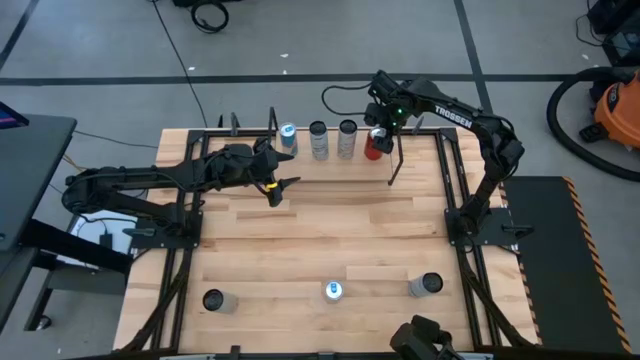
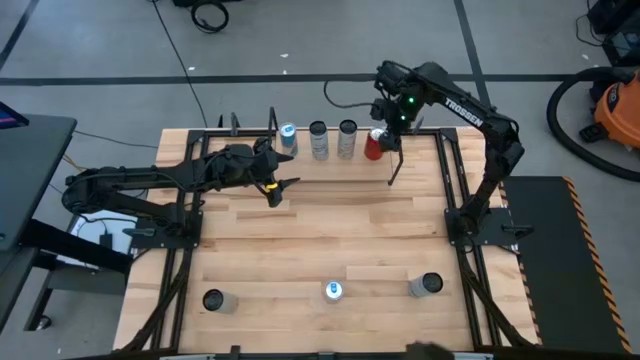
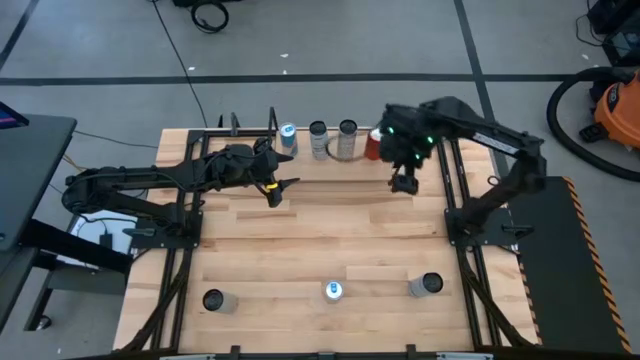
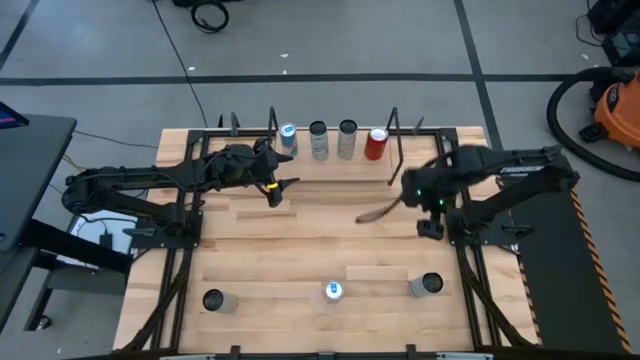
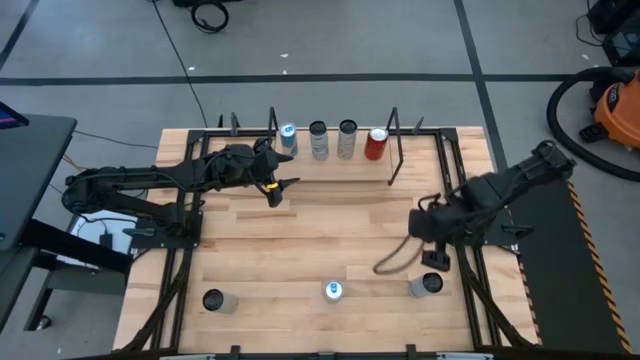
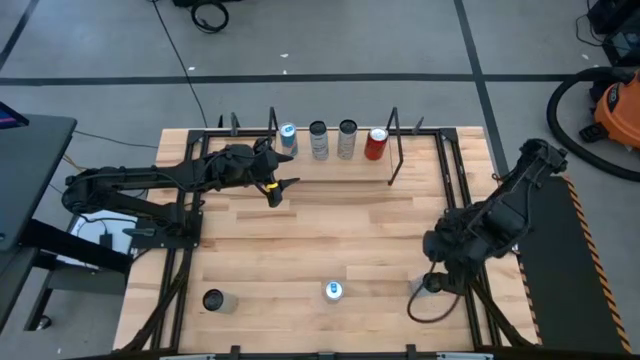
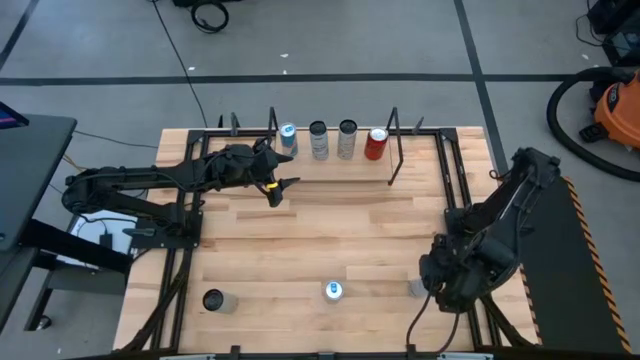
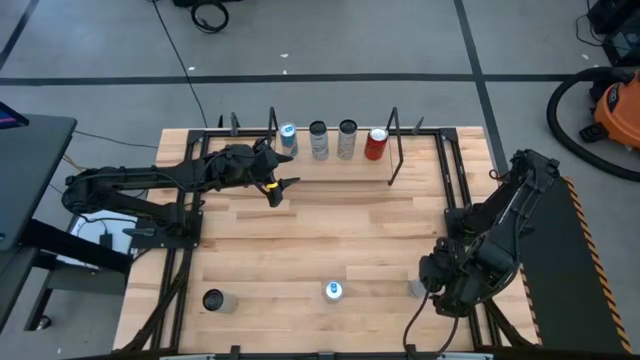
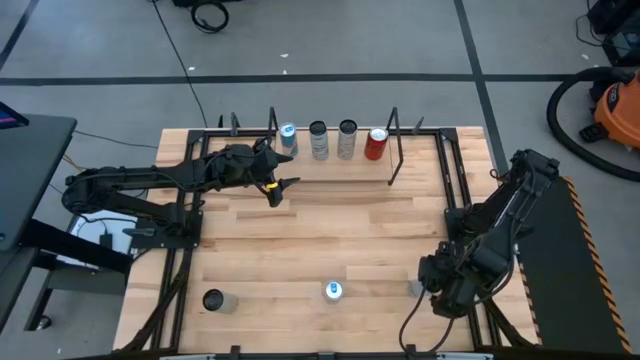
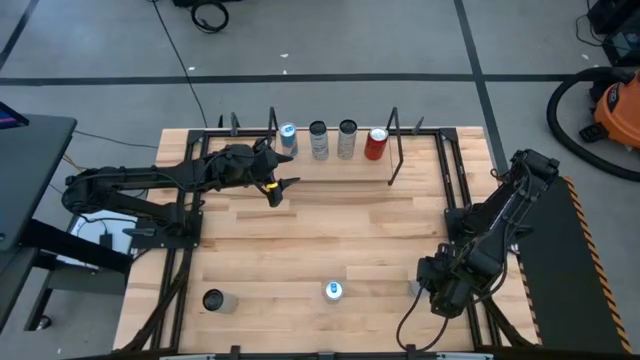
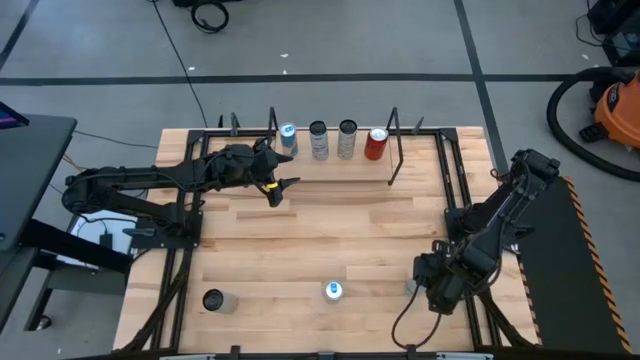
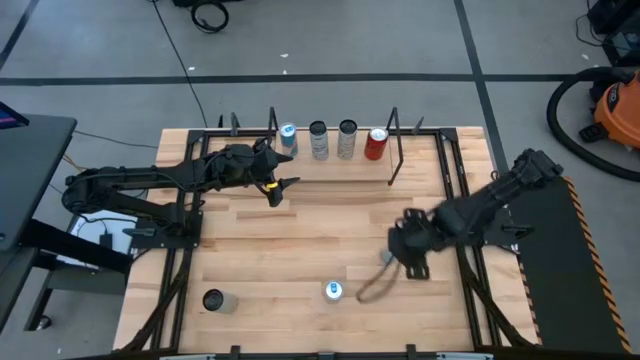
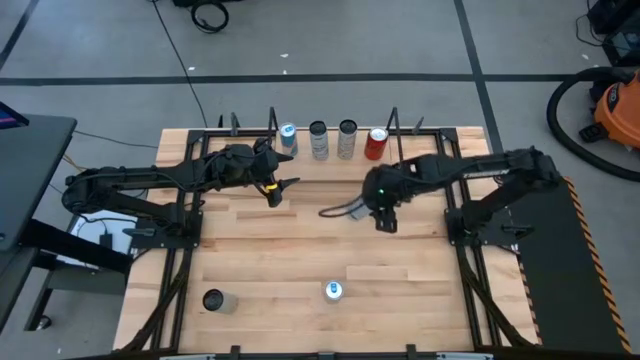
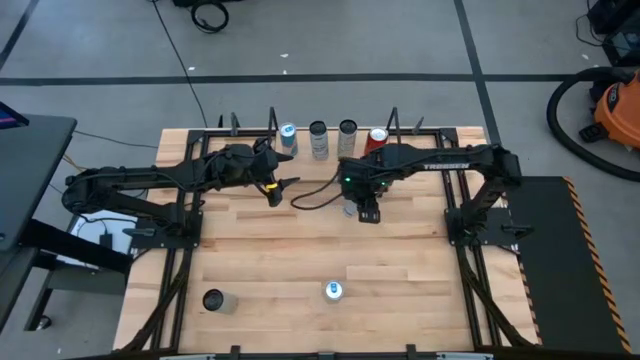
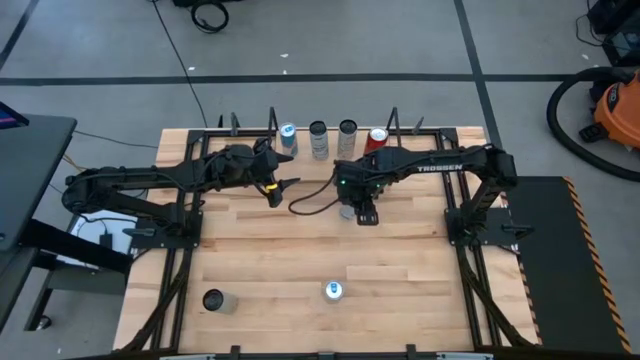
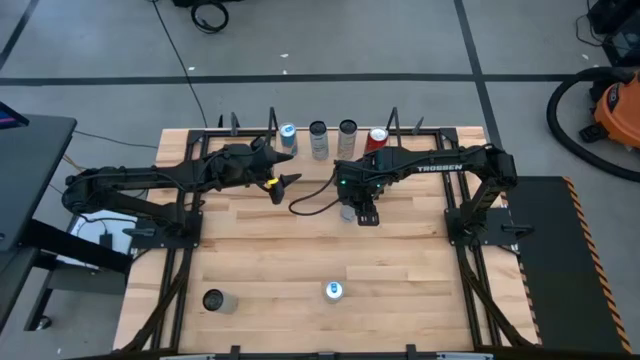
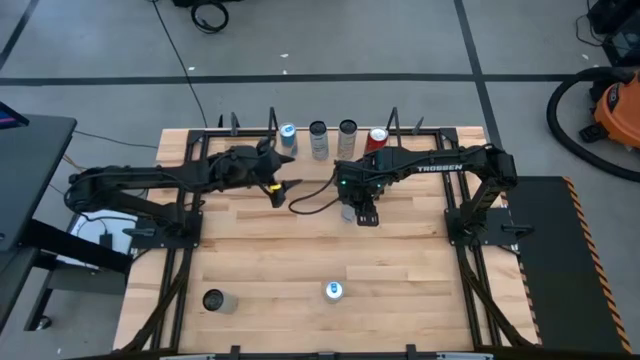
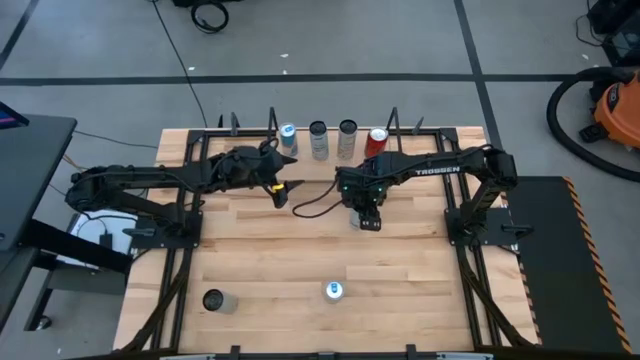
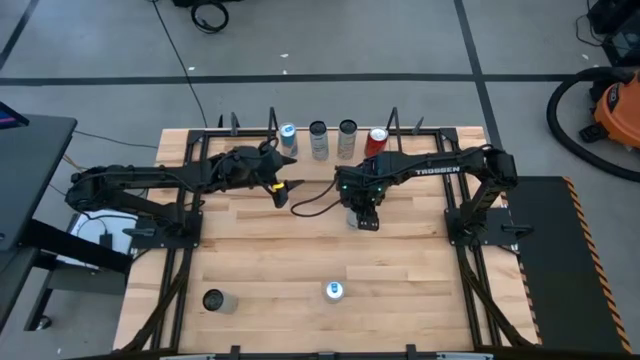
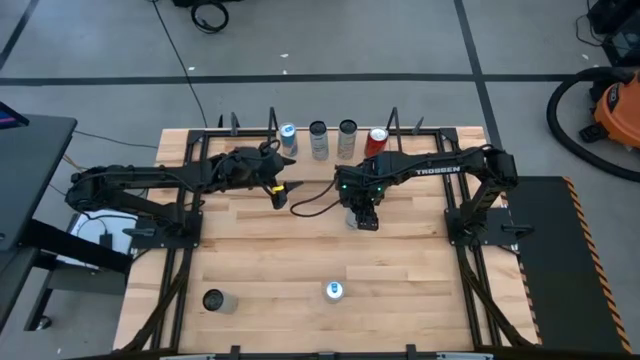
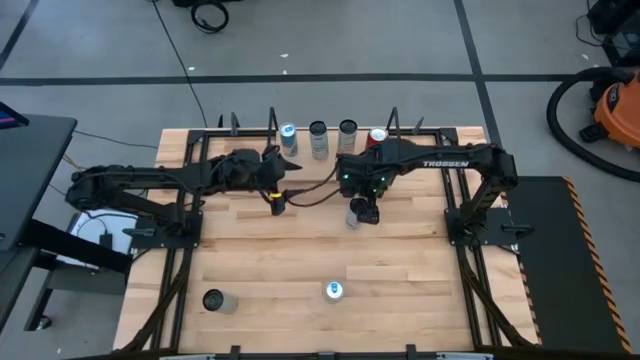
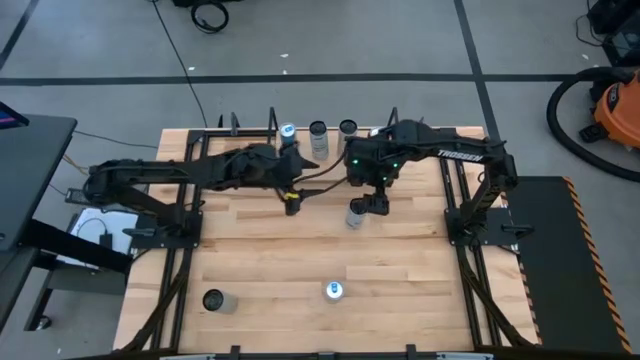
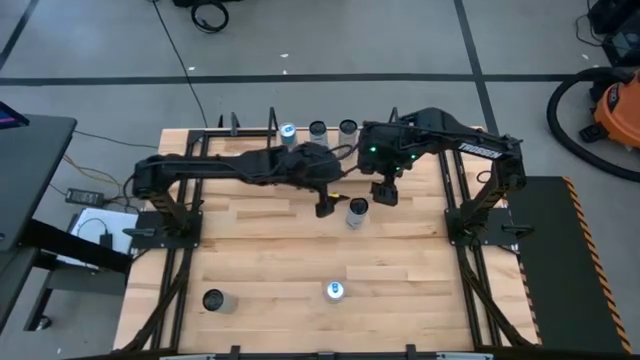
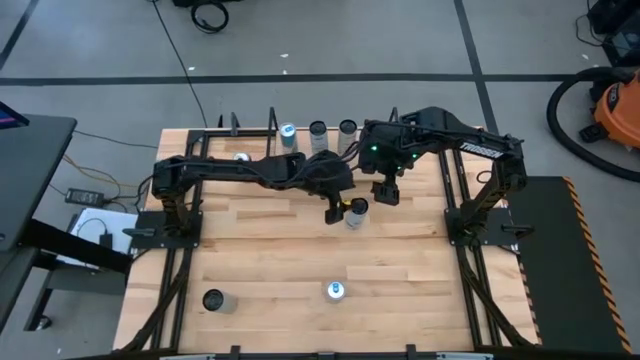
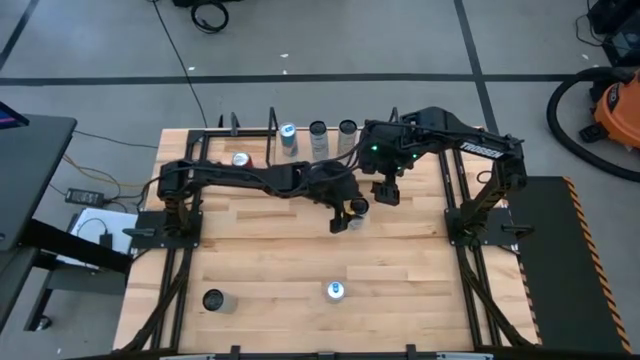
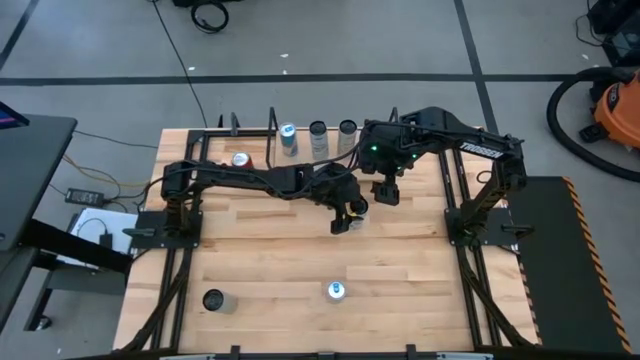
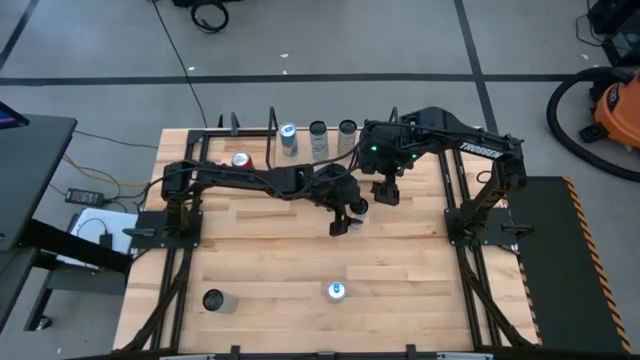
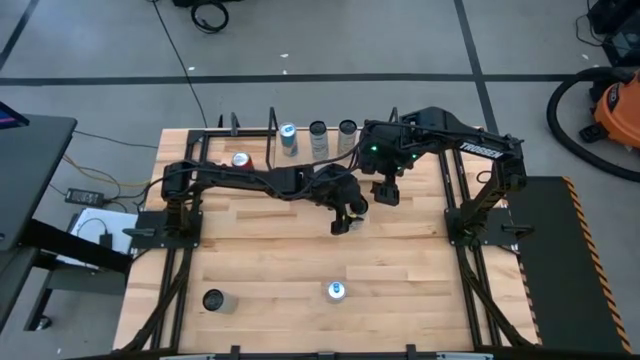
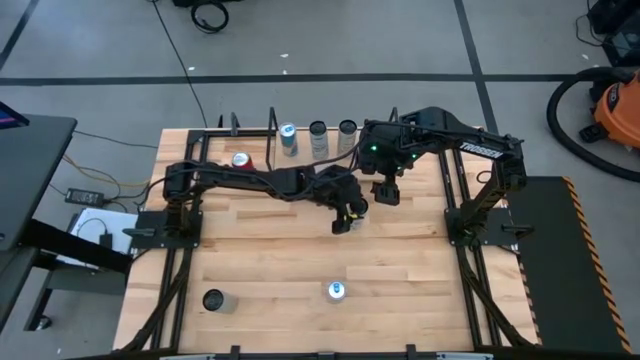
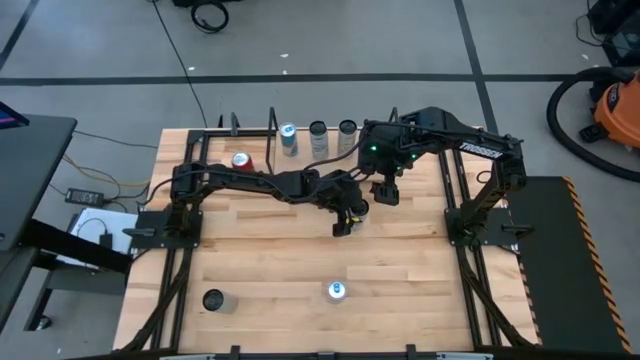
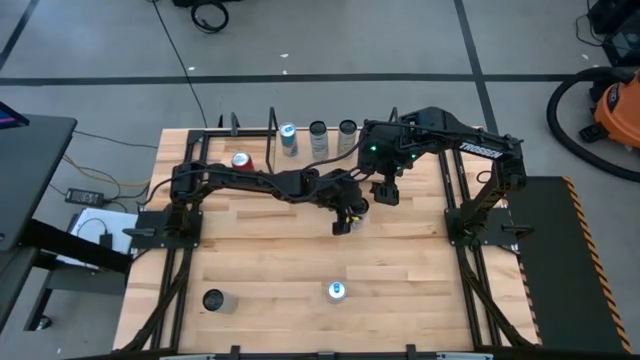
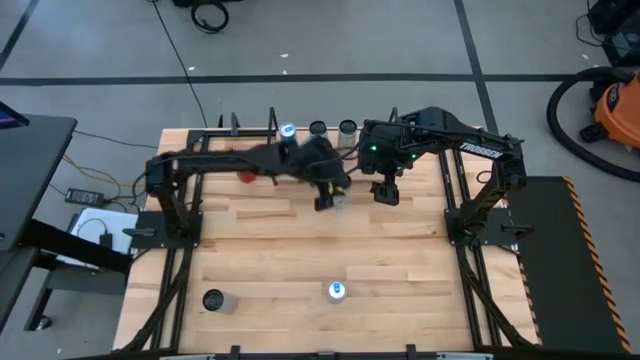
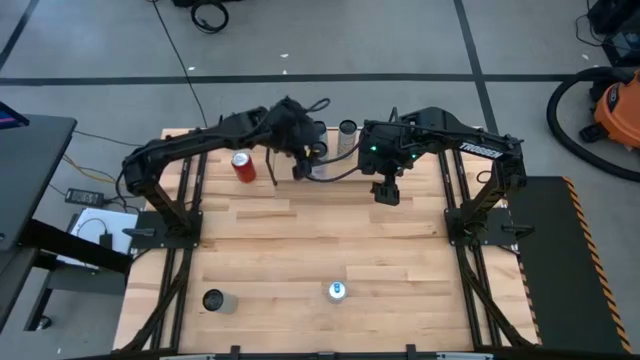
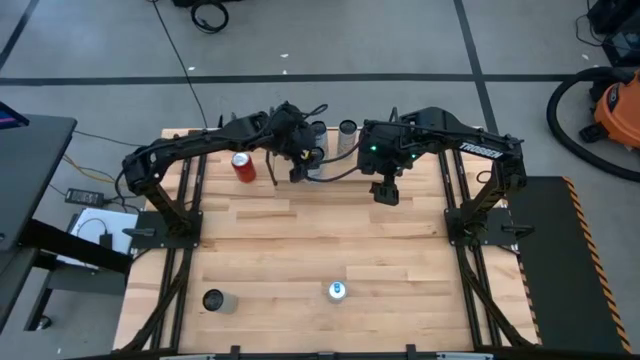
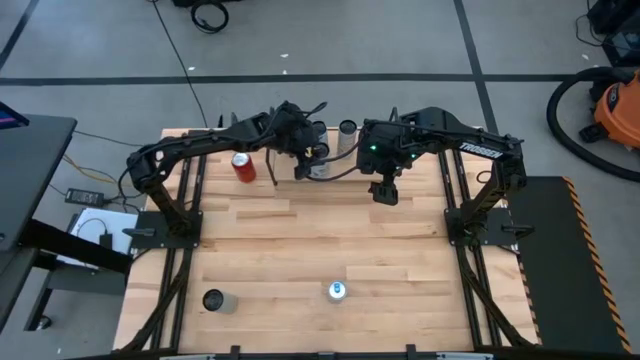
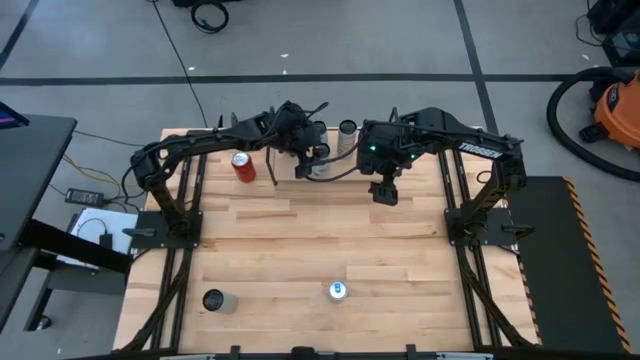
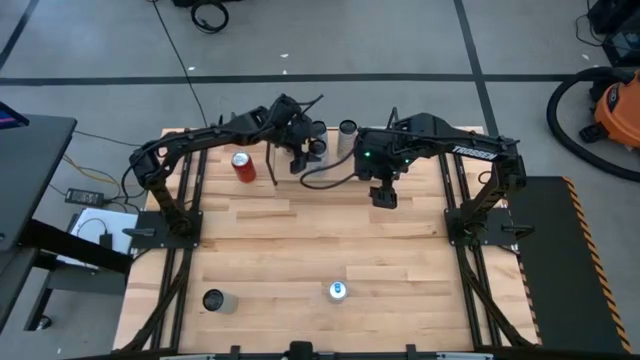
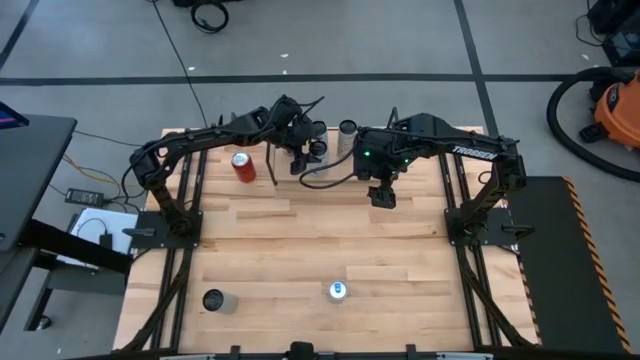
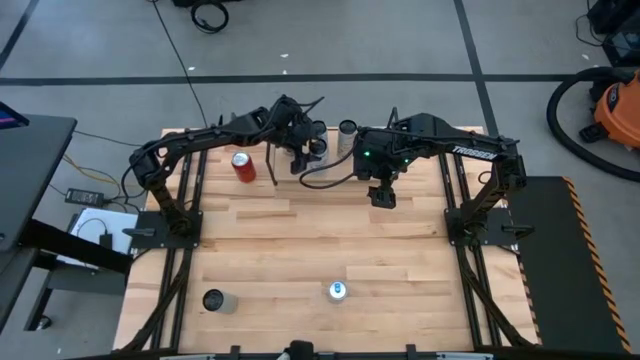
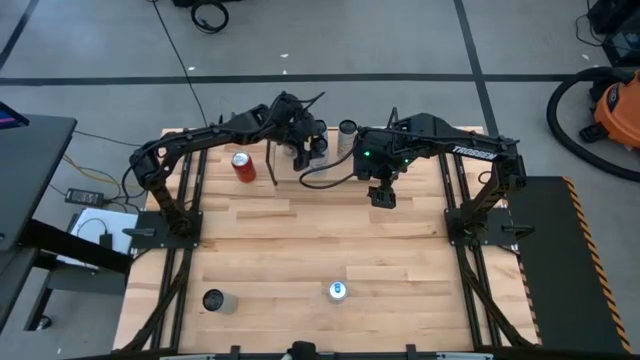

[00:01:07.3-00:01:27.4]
Task: Place canned beverage on shelf
Put the white-blue soda can aligned with the other white-blue soda can on the shelf
